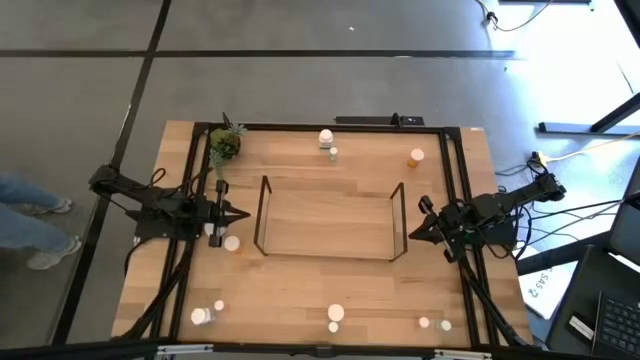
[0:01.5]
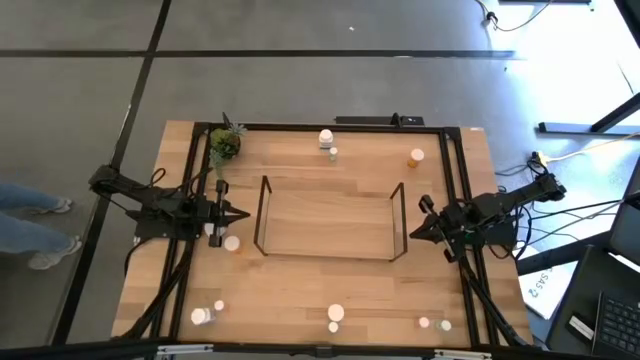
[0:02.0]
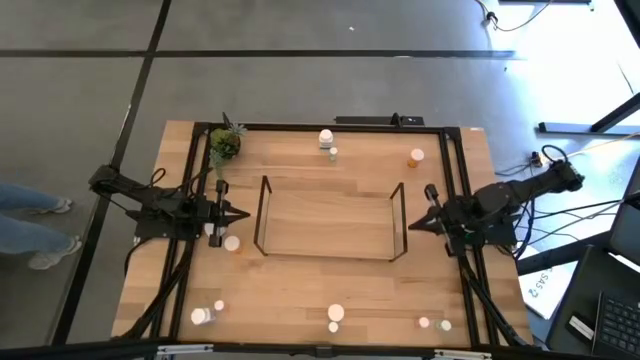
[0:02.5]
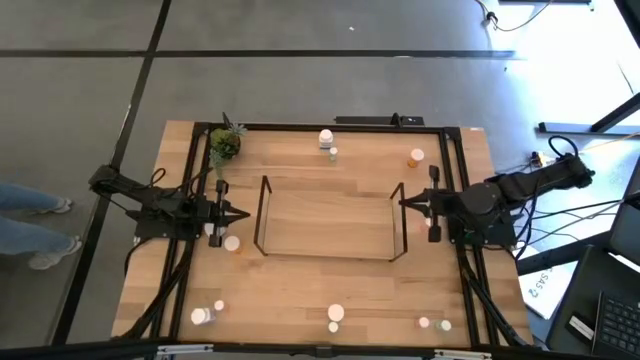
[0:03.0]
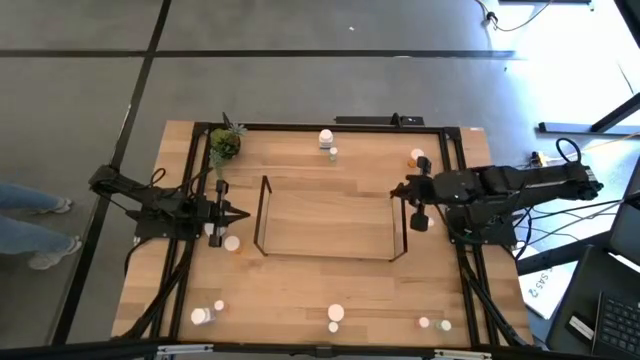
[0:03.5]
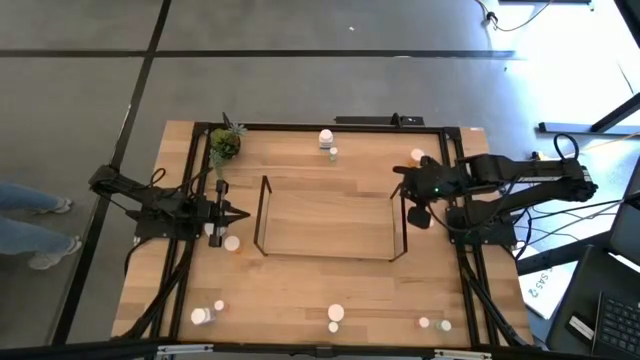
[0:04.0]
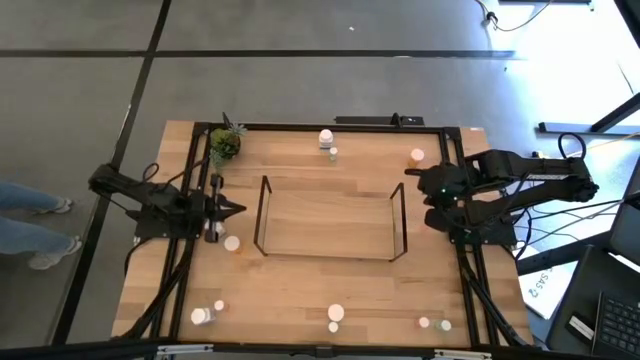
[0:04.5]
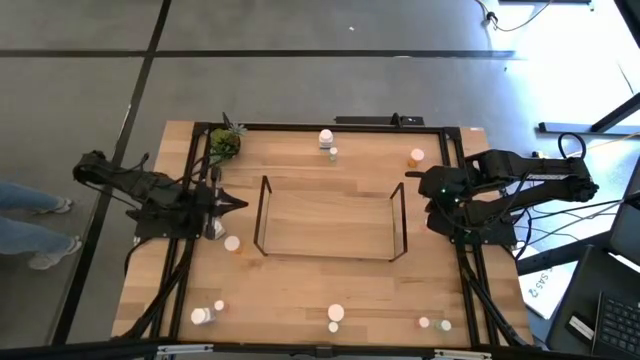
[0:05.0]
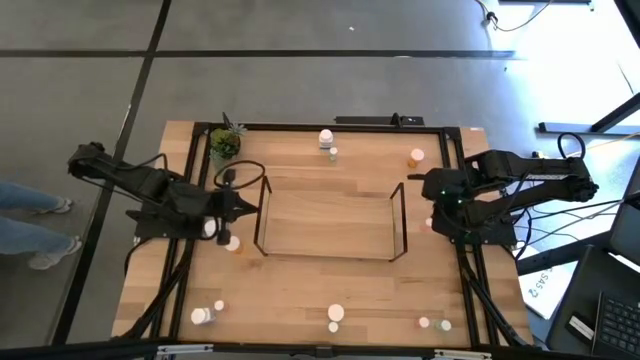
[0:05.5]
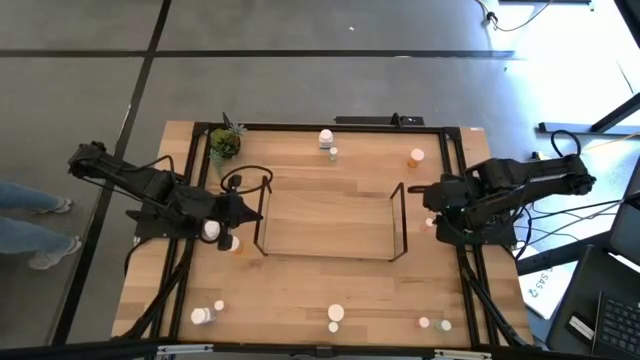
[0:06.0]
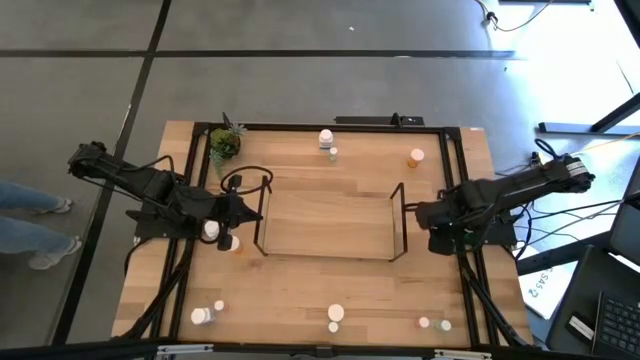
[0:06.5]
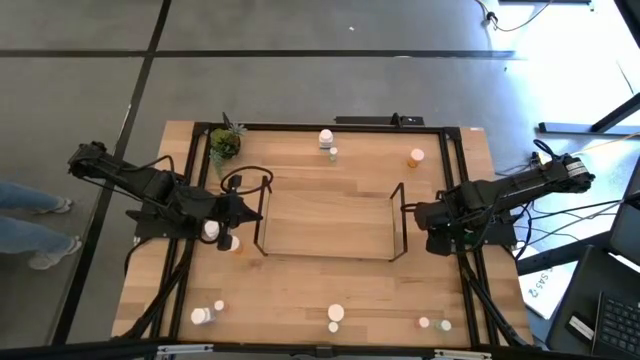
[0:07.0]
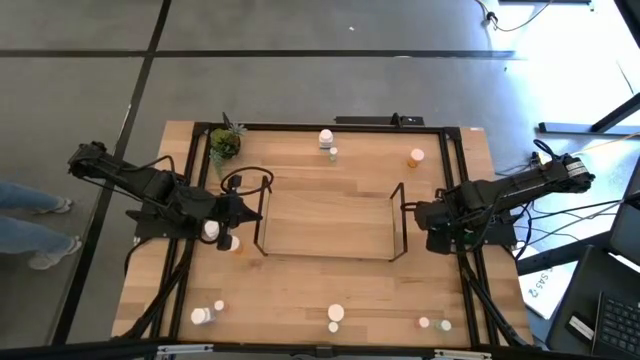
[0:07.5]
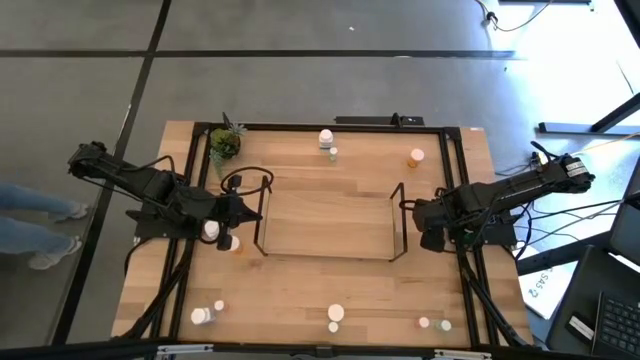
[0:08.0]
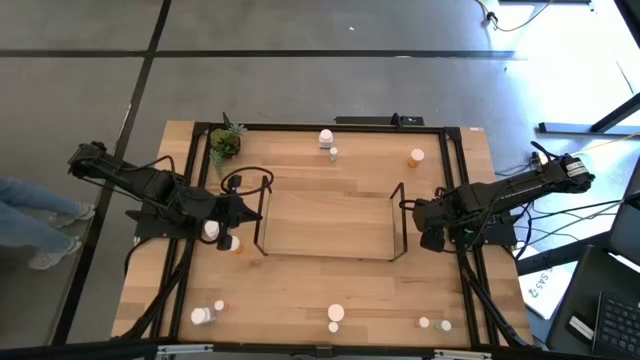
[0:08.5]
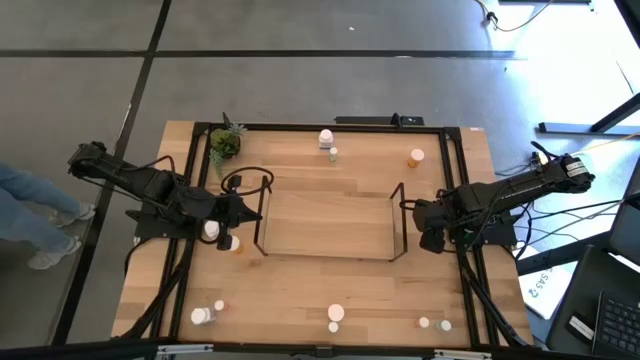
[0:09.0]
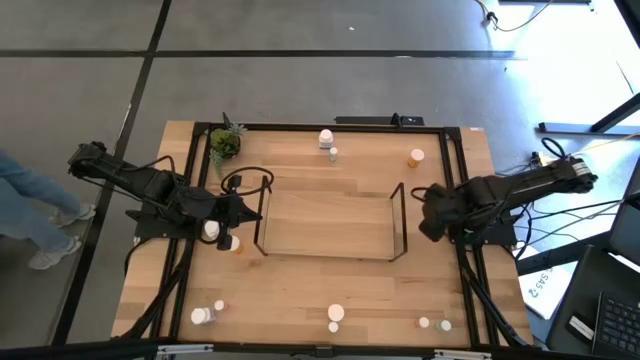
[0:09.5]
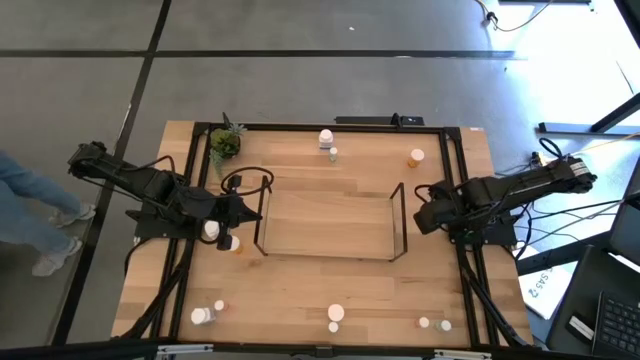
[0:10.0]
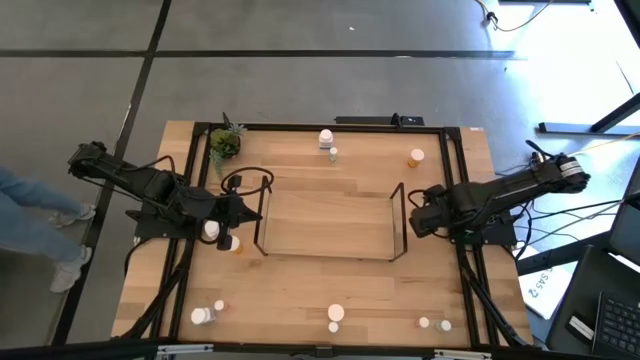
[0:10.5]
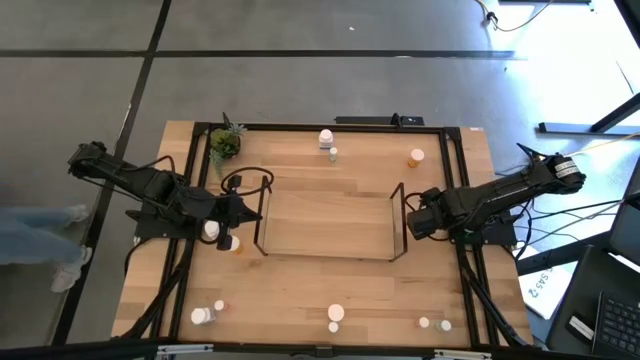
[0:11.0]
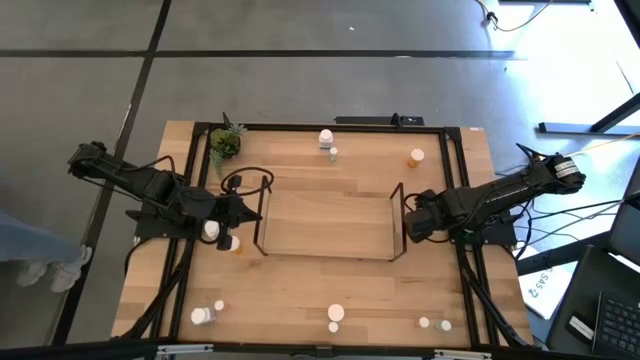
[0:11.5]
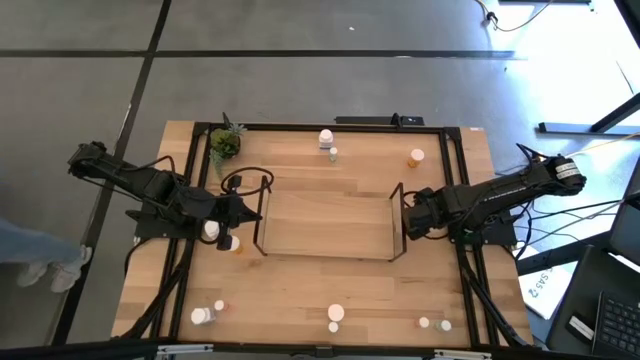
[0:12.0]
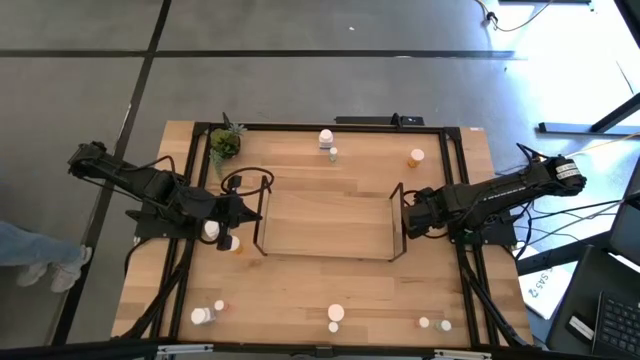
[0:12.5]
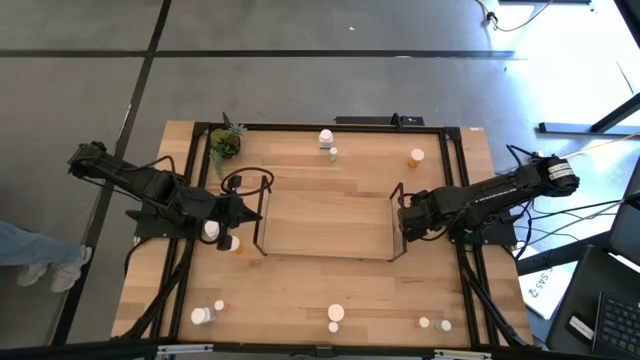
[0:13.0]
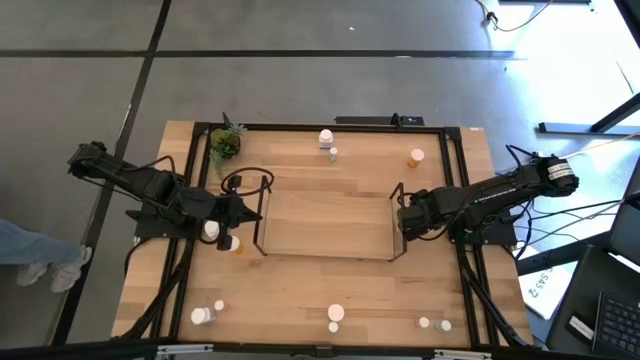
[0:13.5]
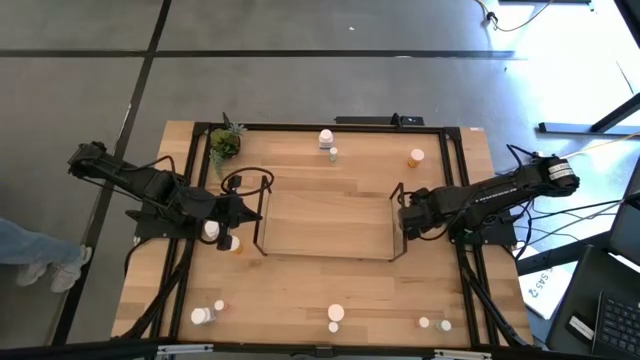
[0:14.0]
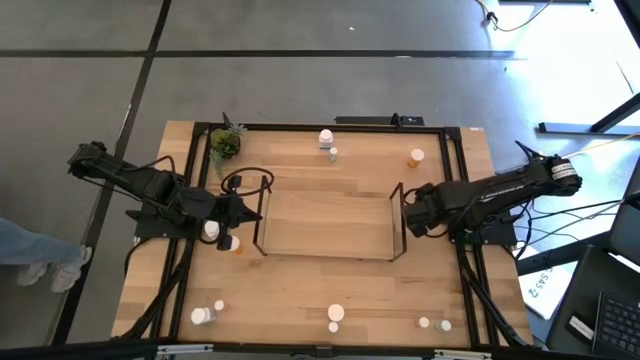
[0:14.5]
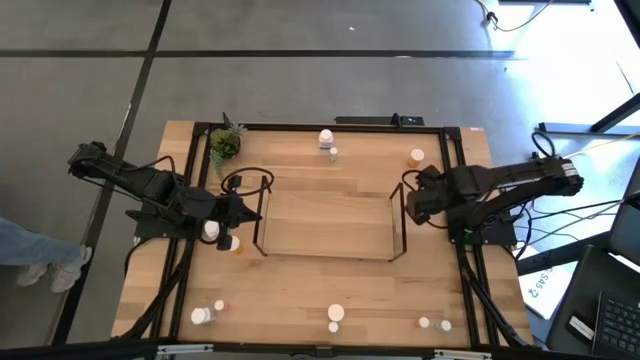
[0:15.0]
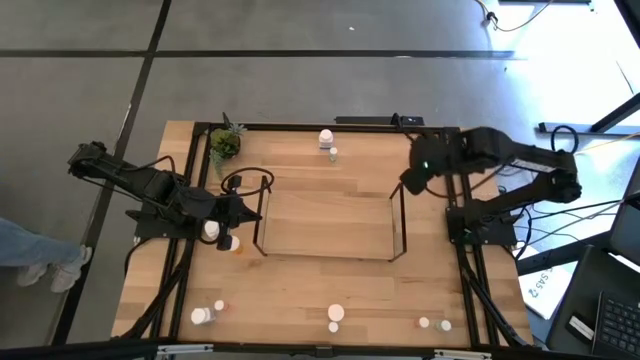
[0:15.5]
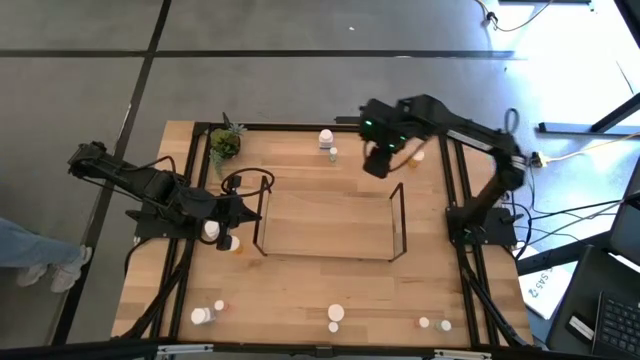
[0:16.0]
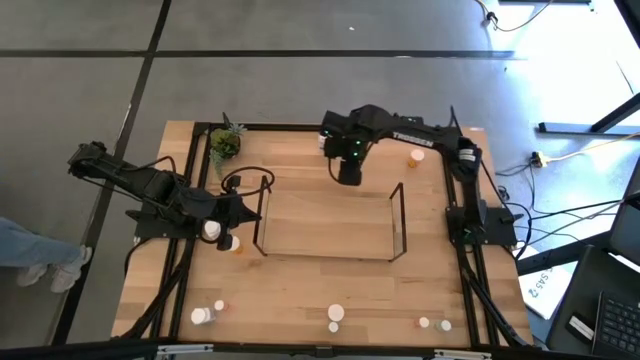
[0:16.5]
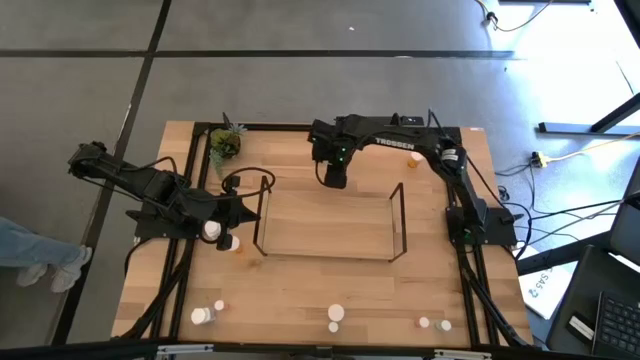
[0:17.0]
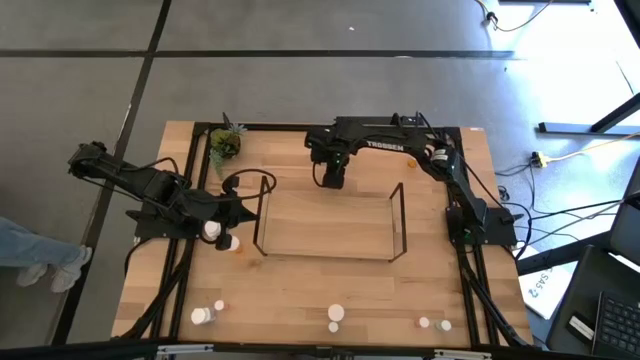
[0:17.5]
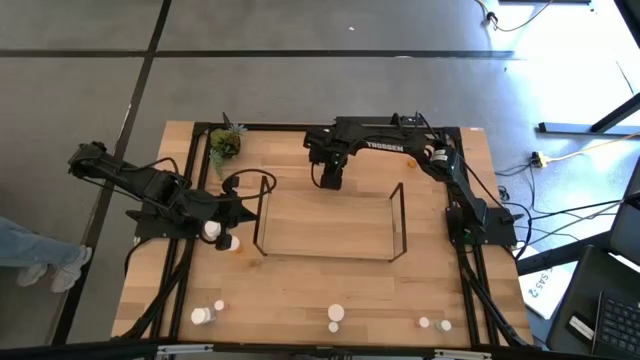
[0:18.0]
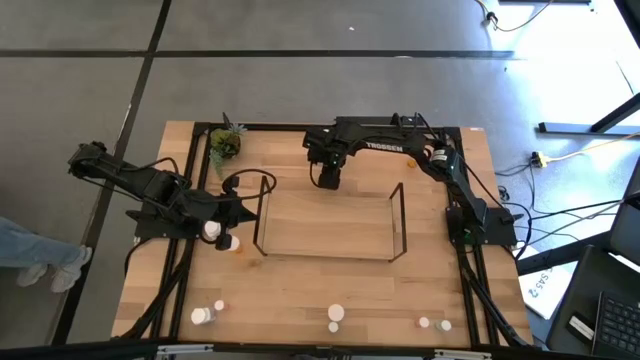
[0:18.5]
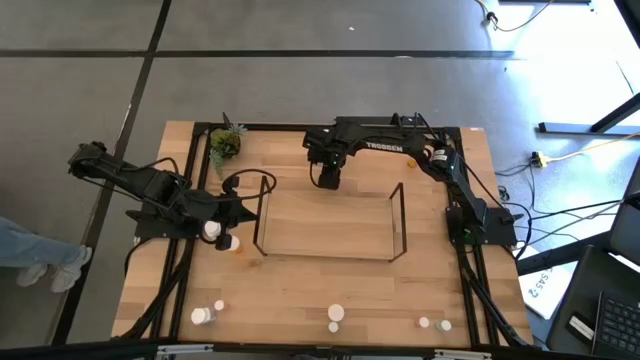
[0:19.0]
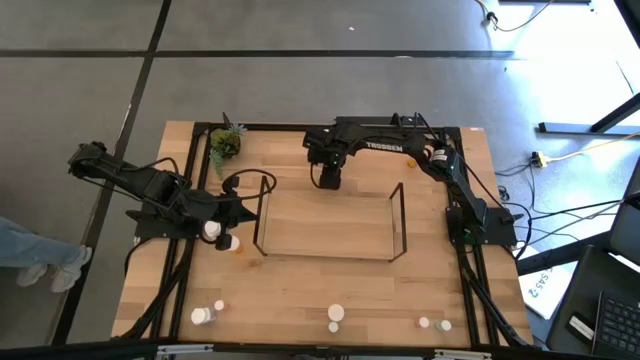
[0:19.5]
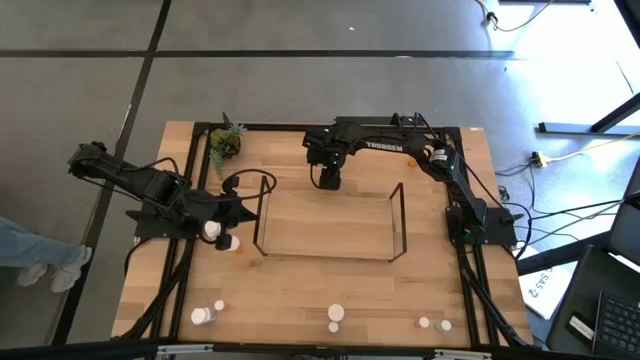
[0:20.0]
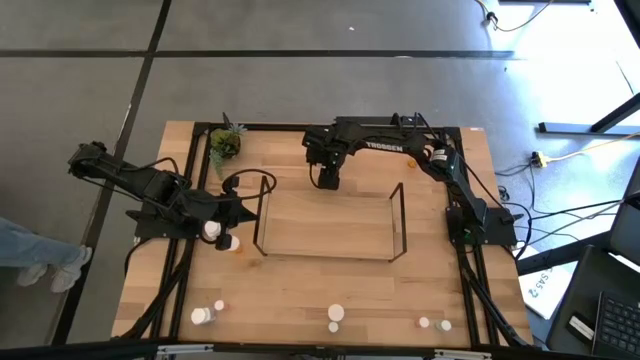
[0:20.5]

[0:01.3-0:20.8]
Task: Pick and place medicine bottles onto shelf by color
Put the top pink pill bottle on the shelf
